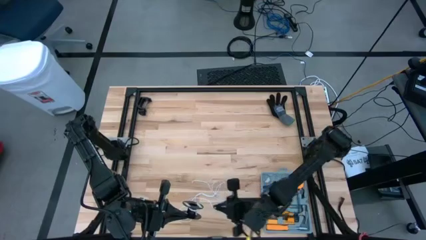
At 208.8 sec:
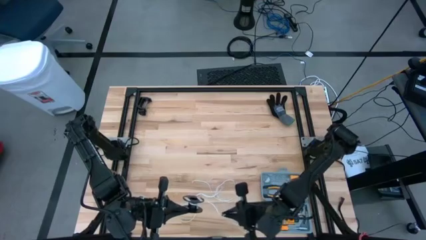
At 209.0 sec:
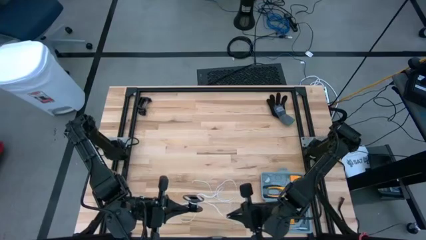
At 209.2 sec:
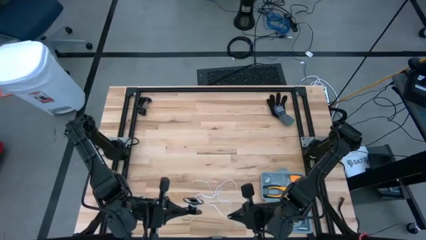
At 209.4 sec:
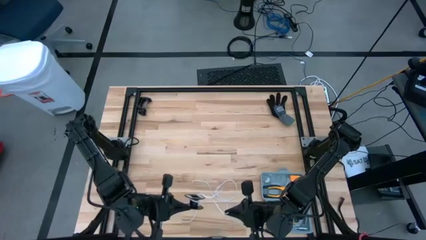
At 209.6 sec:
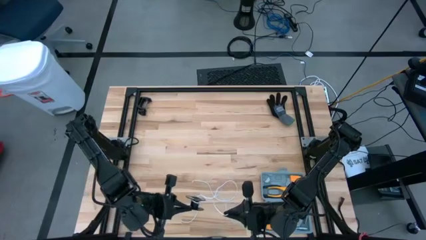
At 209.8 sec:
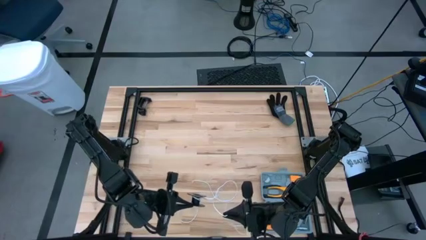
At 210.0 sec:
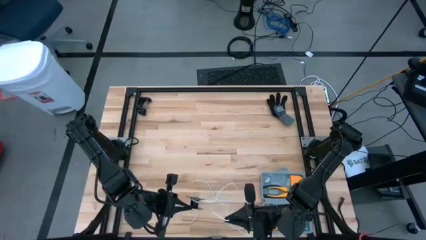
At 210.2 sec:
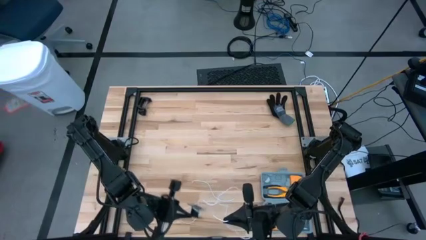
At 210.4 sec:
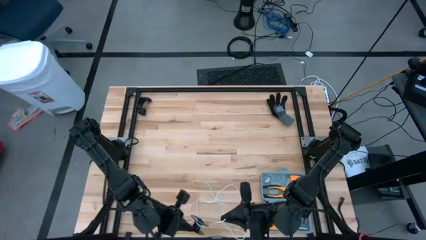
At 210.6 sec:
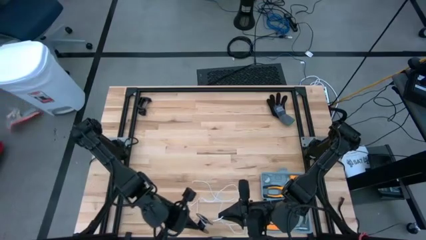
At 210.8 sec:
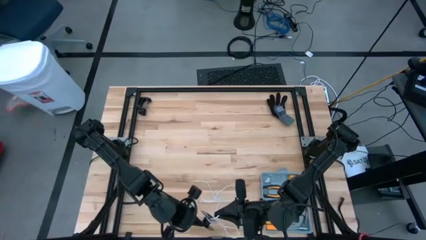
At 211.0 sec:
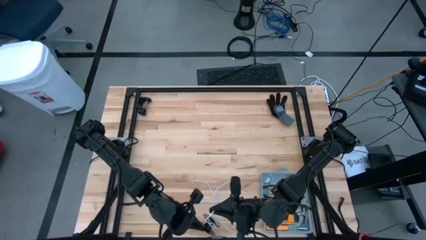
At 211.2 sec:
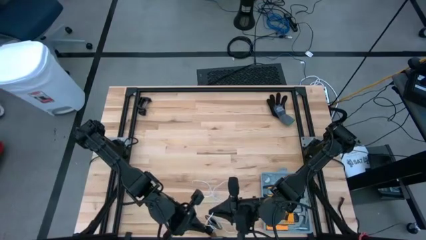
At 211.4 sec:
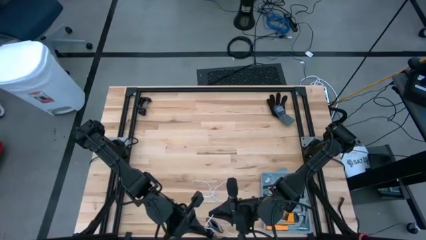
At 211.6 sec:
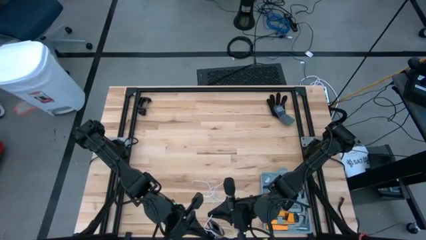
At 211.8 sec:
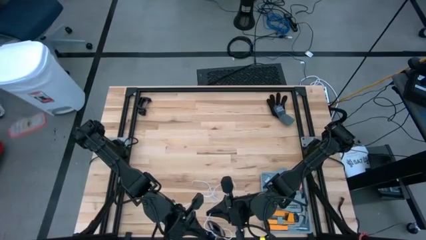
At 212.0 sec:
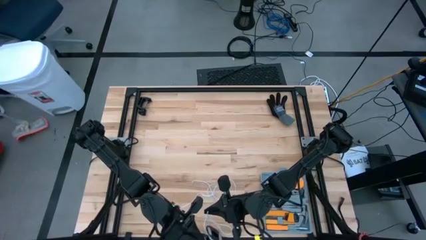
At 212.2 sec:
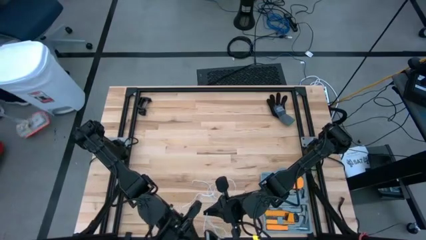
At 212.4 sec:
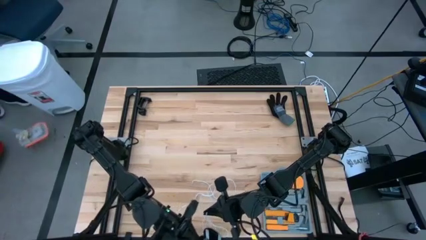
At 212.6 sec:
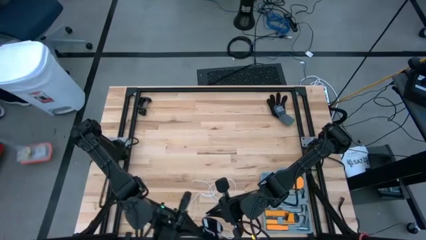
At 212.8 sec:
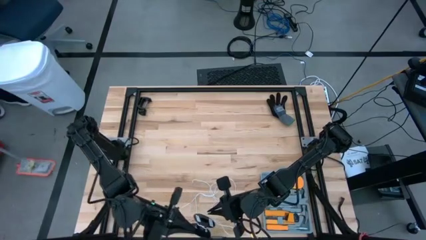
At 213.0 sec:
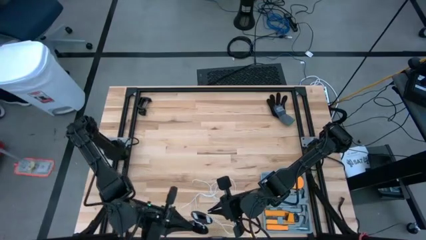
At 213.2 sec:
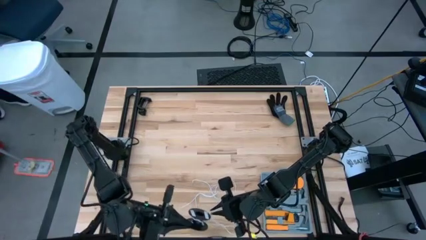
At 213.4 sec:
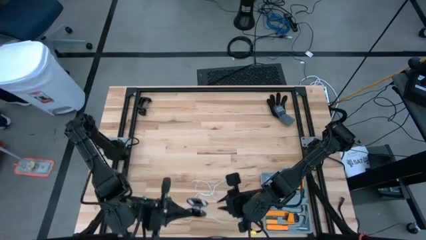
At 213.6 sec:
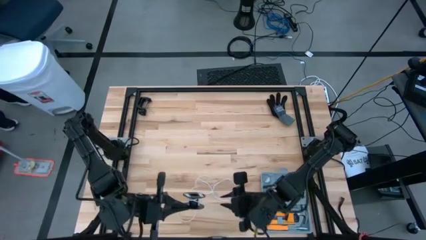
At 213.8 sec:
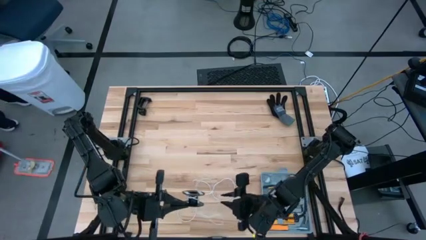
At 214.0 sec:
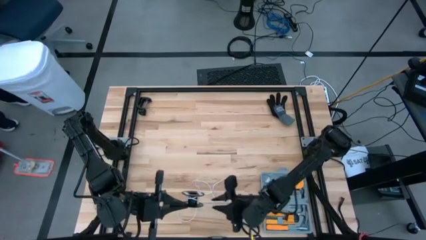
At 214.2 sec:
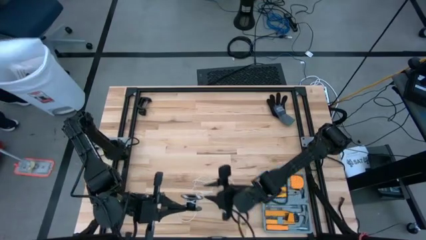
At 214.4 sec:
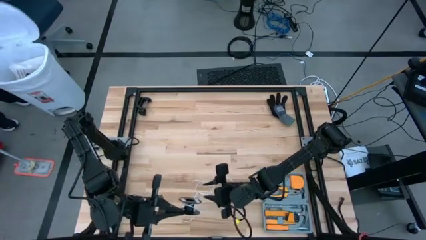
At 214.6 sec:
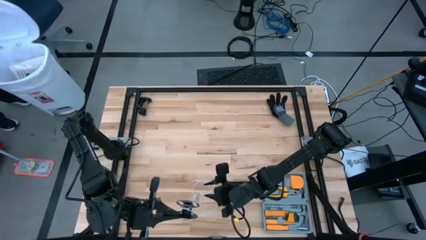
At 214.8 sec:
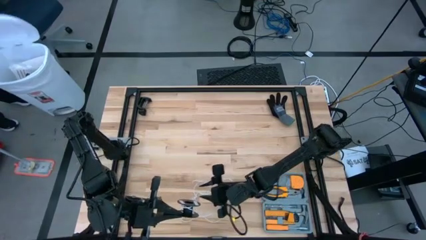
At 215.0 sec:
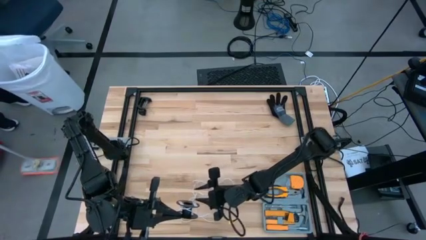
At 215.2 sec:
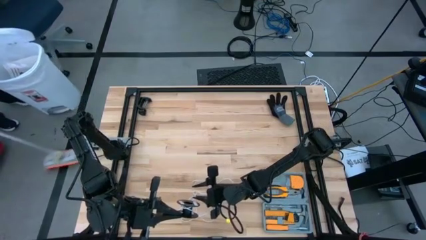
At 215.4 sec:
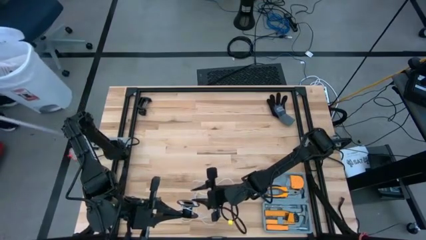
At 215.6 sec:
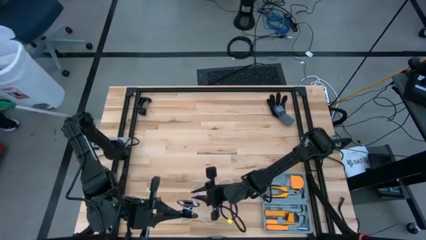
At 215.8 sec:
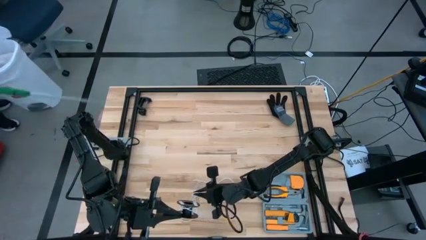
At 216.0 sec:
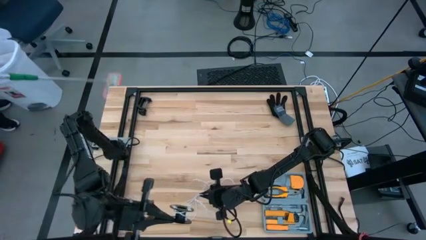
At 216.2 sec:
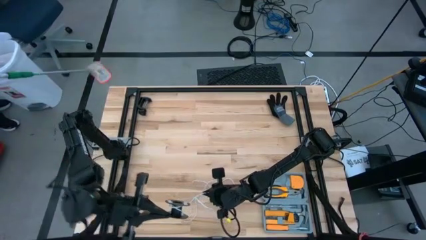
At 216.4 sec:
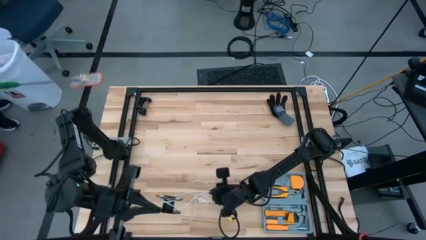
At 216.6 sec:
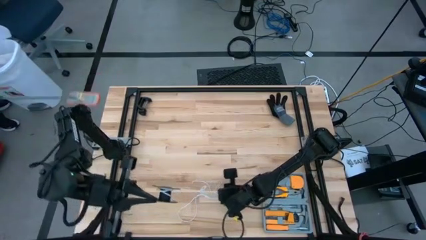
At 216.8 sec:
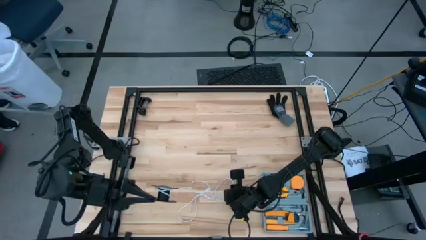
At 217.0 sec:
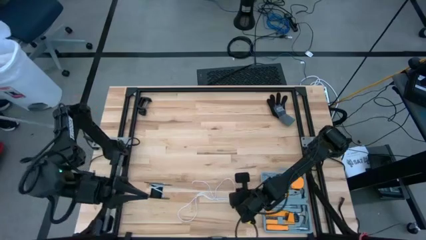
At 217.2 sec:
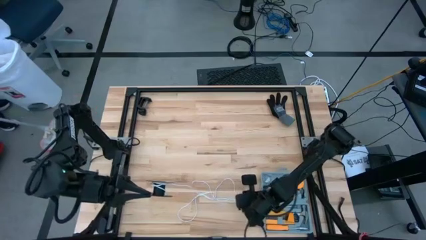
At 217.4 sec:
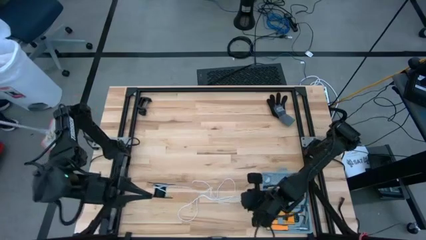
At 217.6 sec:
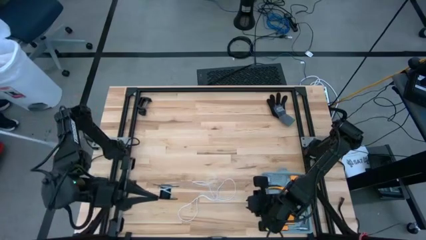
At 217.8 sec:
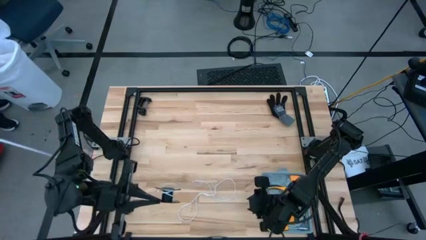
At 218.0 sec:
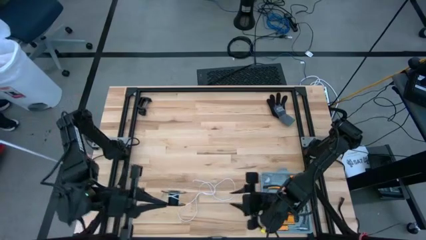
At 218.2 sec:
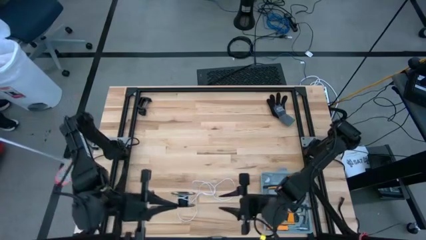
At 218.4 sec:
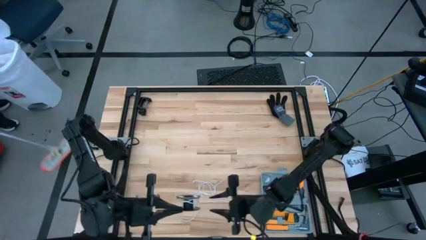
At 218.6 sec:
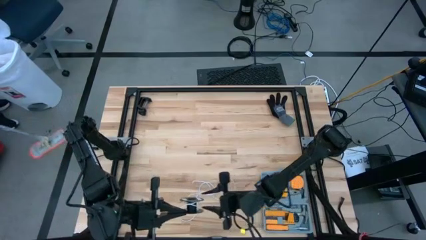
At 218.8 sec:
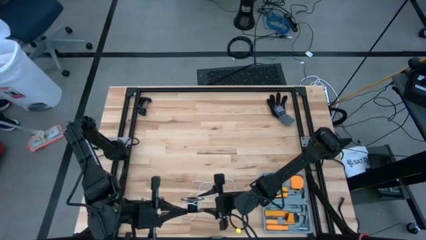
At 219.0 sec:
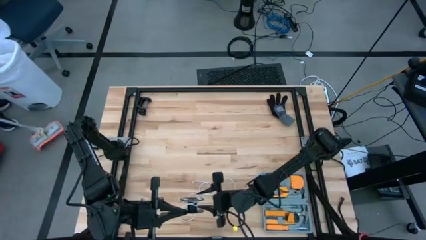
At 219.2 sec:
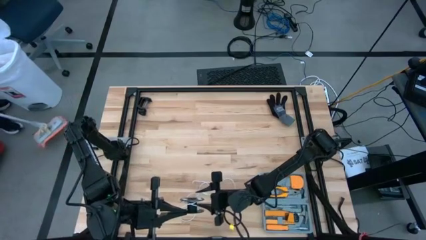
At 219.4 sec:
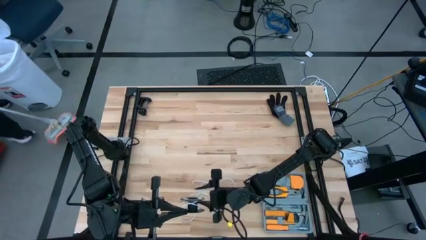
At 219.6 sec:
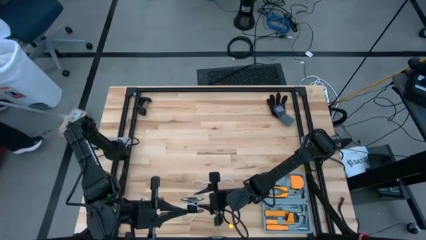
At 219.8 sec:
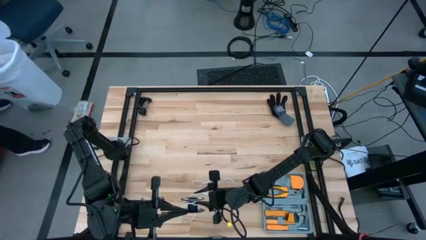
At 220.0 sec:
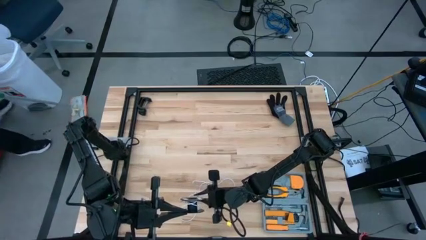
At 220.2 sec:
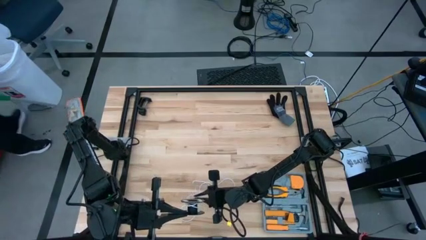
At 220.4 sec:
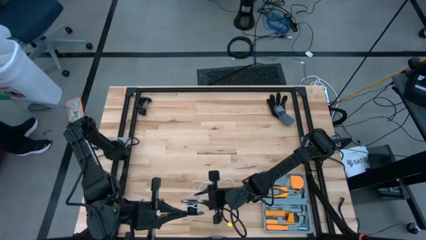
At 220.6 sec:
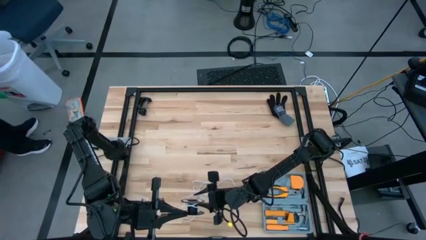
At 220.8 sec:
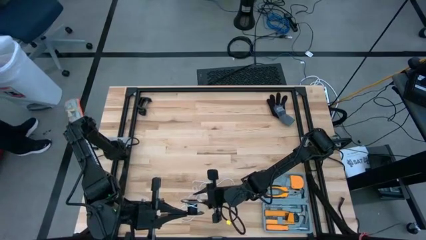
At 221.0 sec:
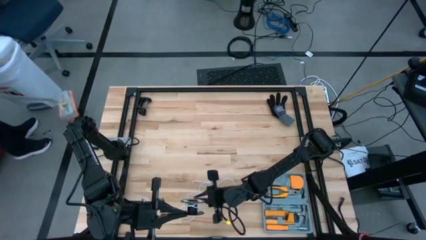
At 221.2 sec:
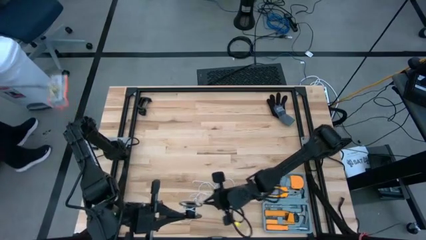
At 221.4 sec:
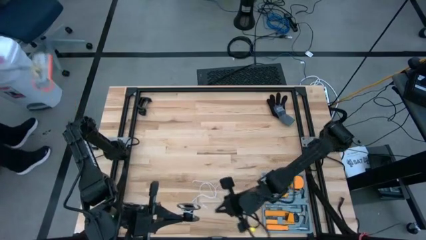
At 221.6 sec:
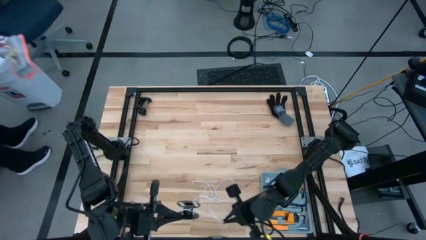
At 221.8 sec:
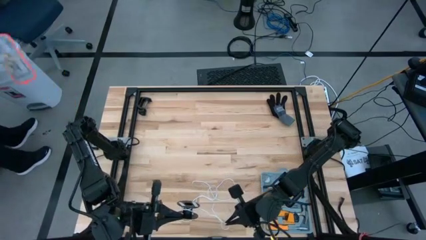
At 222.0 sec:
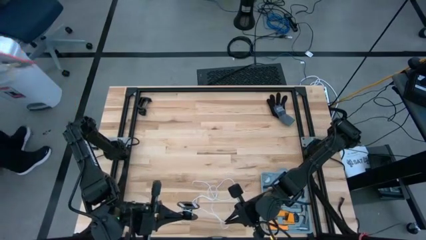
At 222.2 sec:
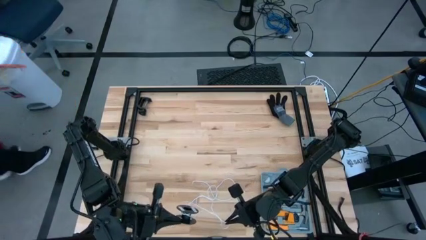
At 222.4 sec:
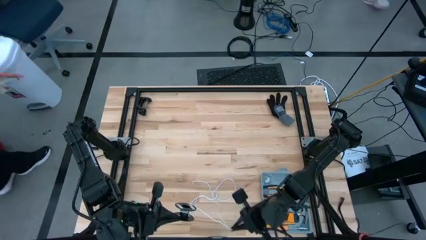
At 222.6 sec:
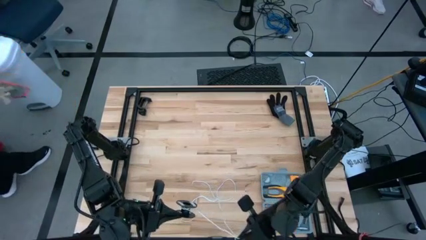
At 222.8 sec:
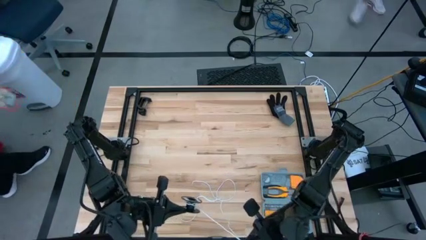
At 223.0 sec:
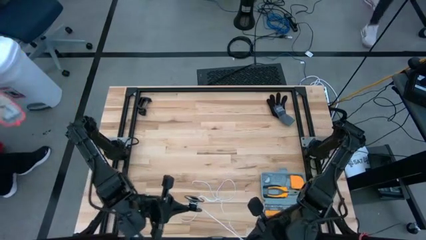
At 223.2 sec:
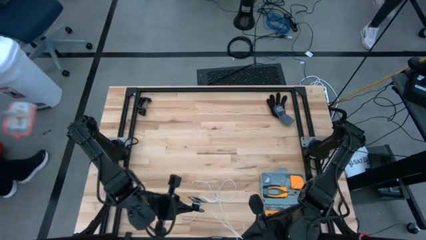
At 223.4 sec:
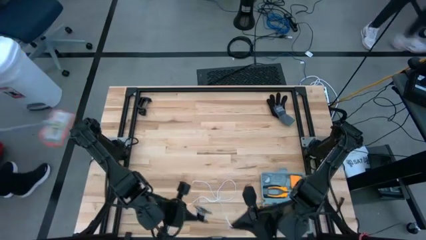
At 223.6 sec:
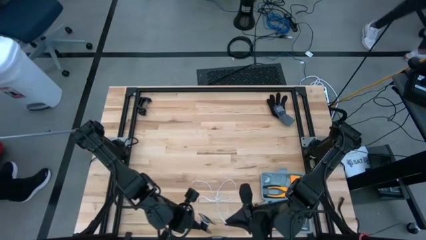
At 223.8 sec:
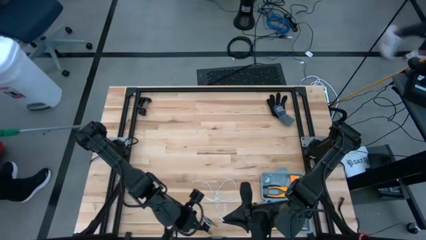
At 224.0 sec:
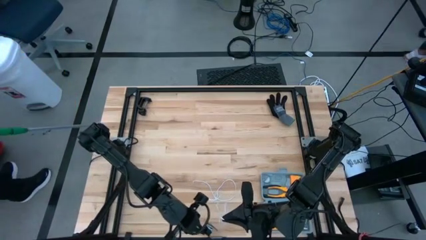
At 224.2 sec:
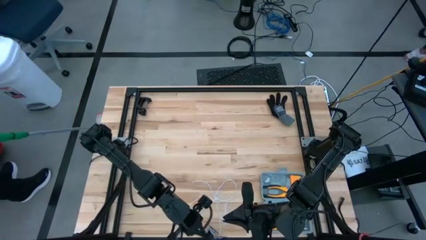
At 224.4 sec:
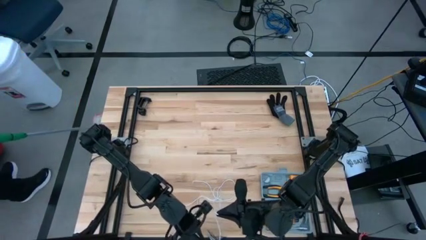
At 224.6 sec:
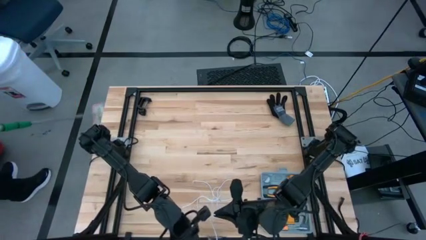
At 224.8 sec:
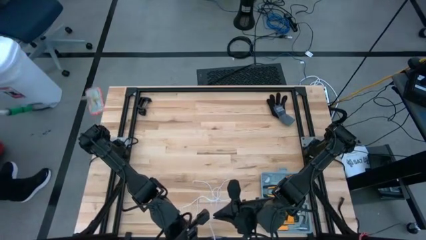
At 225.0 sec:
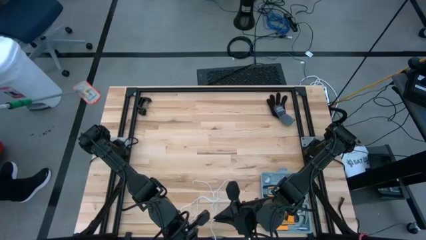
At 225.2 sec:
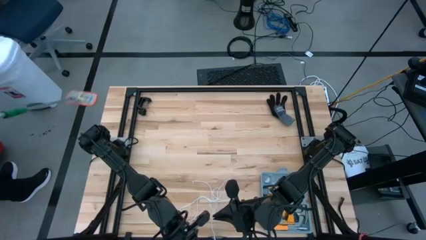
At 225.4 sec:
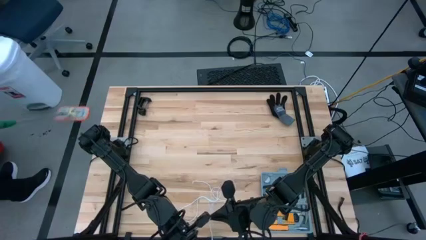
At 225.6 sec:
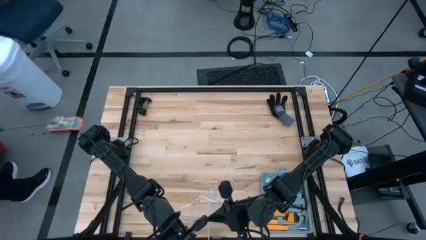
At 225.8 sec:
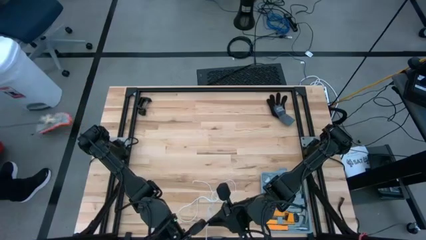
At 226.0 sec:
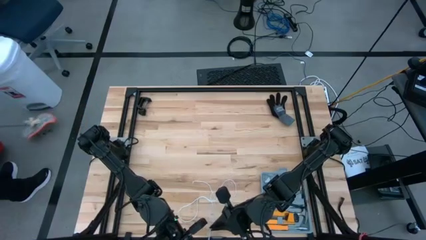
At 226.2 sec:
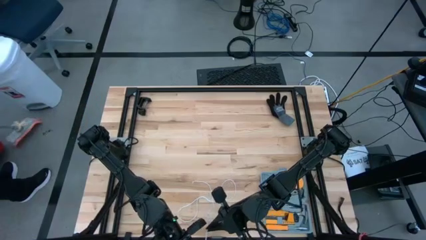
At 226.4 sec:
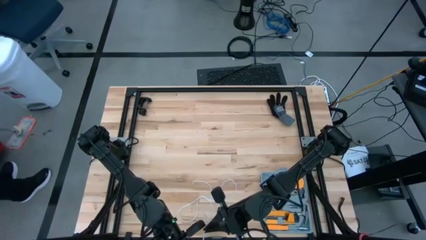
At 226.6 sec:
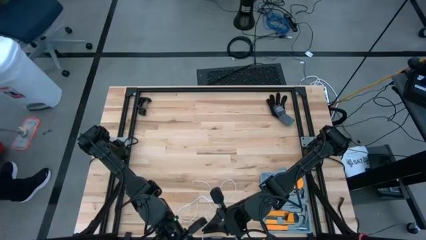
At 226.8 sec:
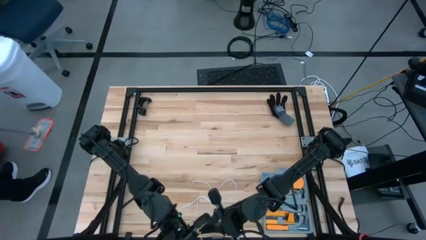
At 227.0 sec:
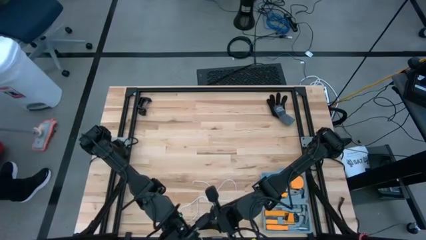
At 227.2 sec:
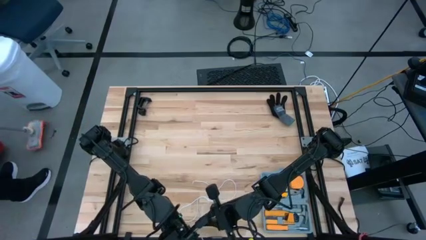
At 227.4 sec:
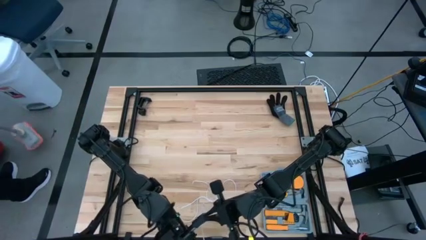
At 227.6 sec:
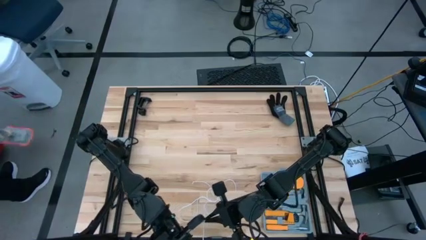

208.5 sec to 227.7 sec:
Task: Coil cords
Coil the white cable wire onto the spool
